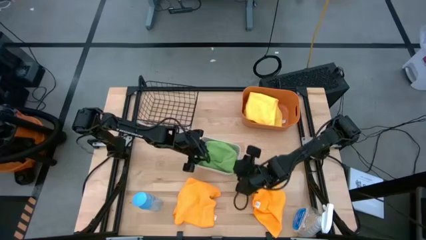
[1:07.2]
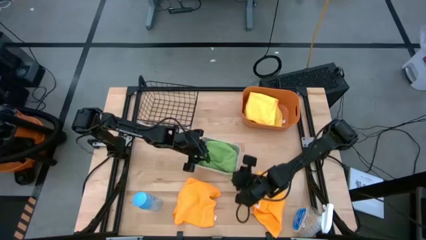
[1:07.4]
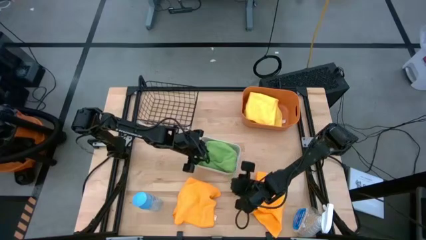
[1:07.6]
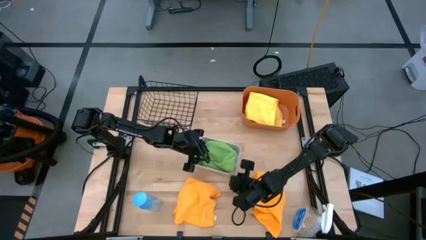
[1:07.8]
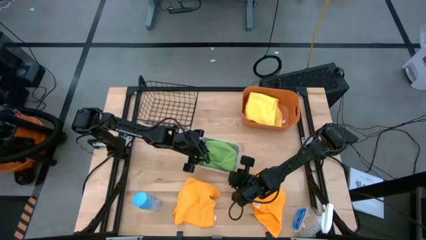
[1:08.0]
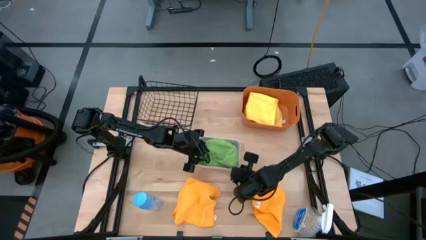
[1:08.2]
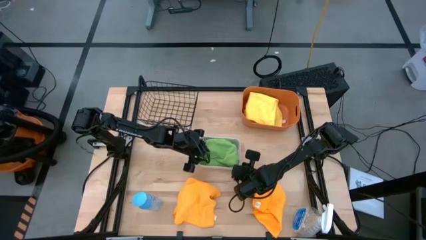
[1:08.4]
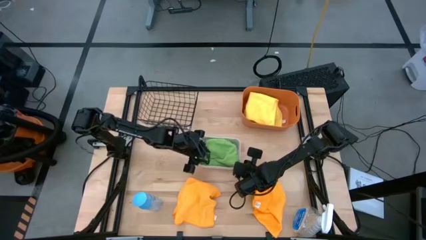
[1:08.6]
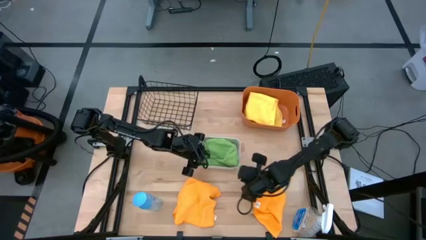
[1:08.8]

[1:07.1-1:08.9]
Task: Sort microfiber towel by color & place in baskets
Adjust the white bin

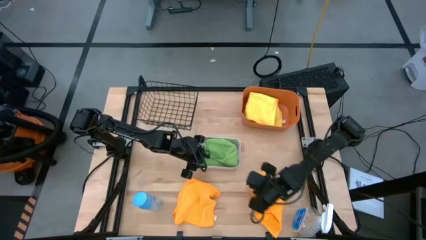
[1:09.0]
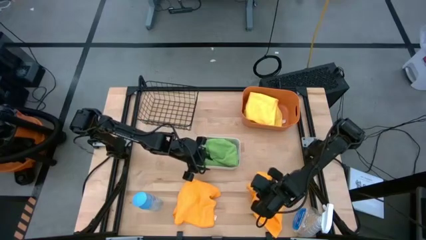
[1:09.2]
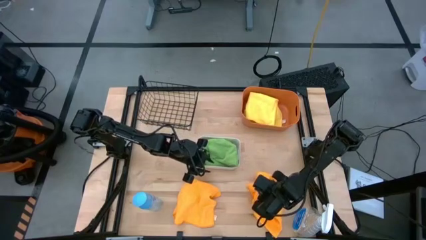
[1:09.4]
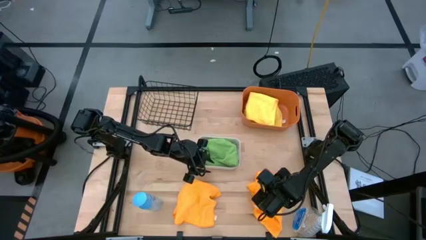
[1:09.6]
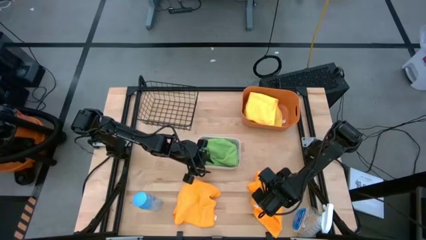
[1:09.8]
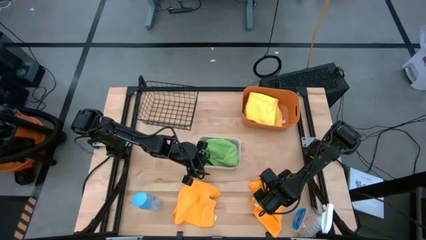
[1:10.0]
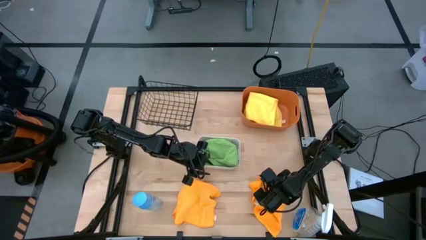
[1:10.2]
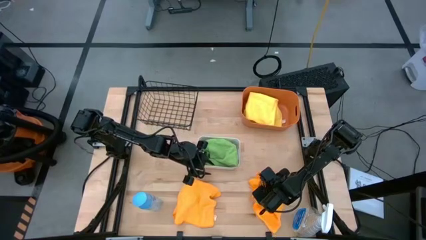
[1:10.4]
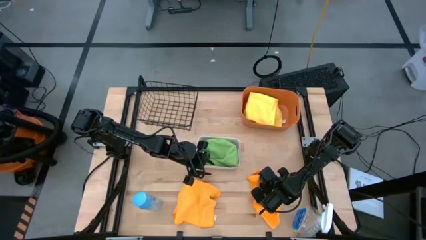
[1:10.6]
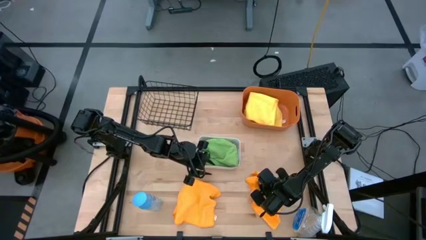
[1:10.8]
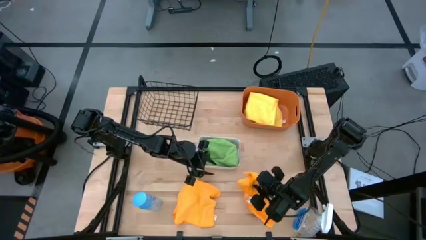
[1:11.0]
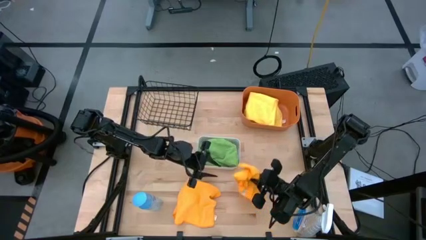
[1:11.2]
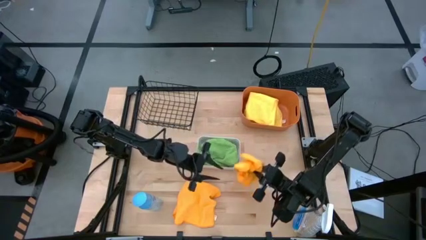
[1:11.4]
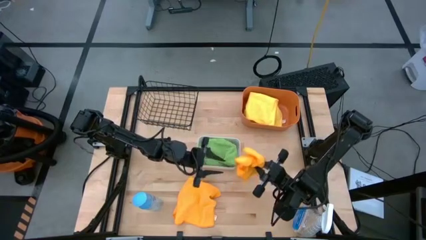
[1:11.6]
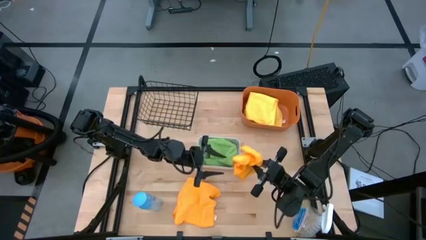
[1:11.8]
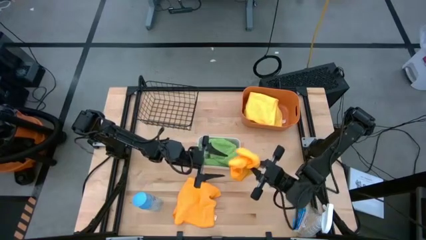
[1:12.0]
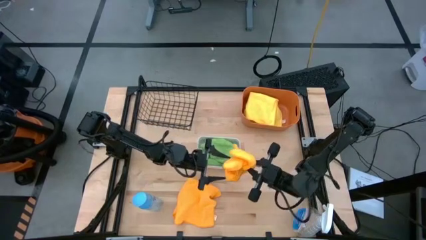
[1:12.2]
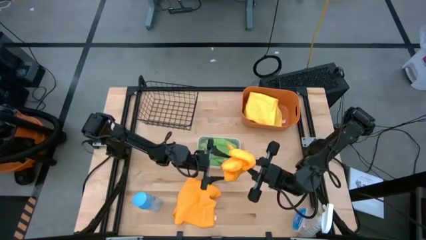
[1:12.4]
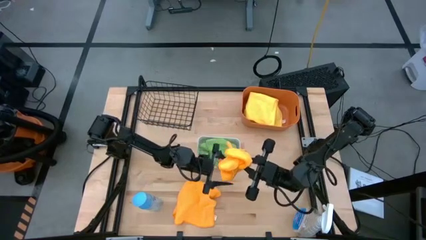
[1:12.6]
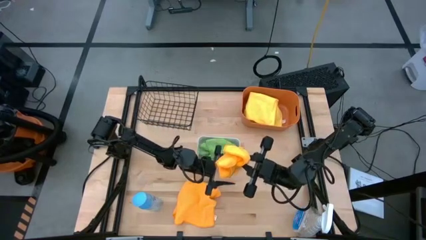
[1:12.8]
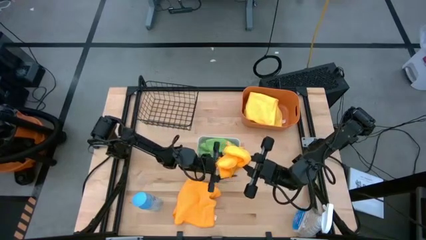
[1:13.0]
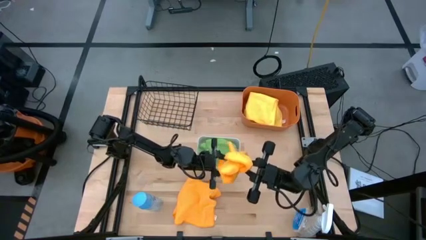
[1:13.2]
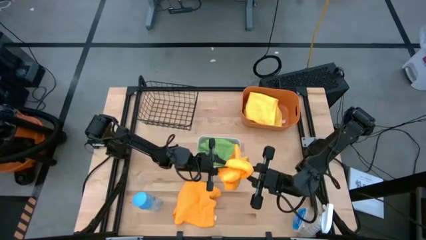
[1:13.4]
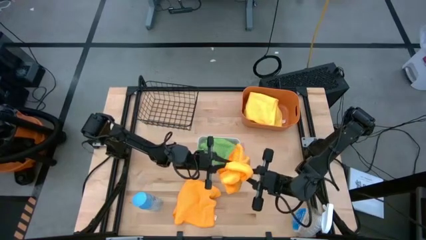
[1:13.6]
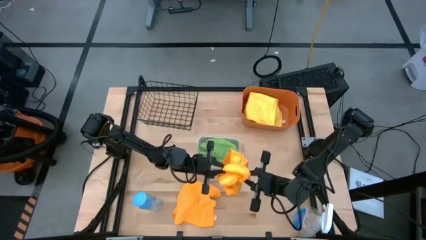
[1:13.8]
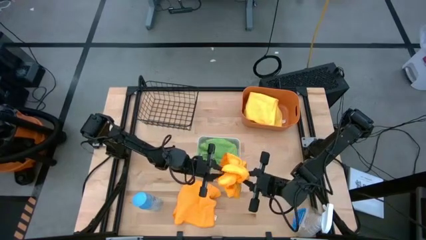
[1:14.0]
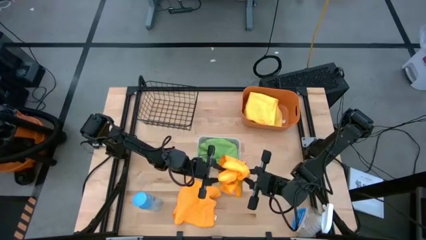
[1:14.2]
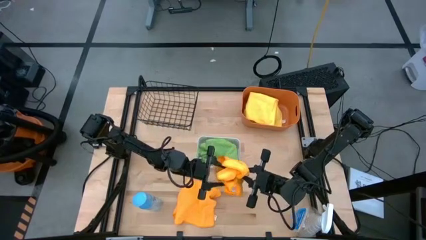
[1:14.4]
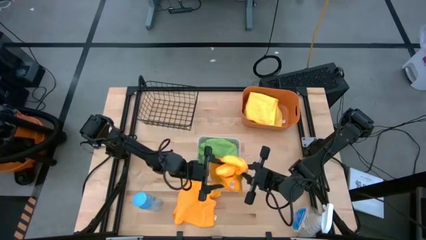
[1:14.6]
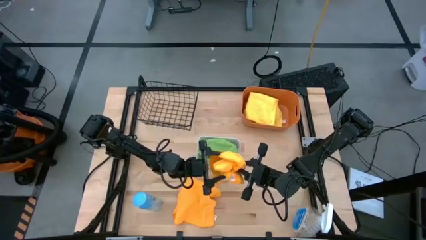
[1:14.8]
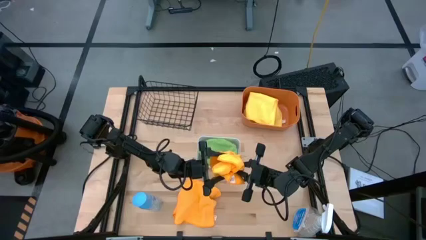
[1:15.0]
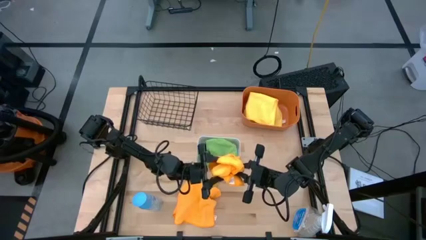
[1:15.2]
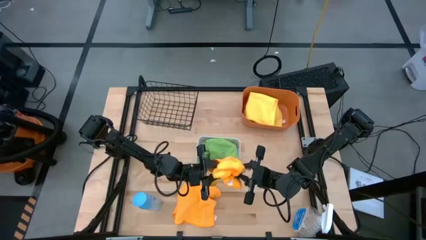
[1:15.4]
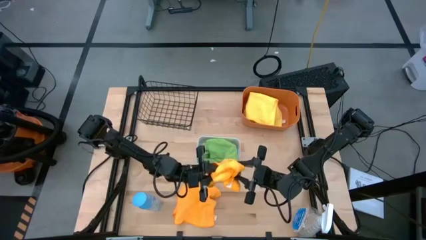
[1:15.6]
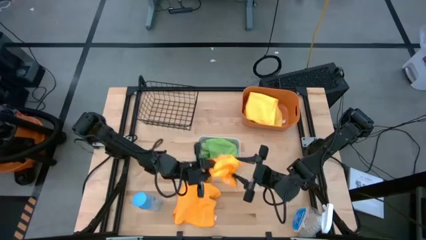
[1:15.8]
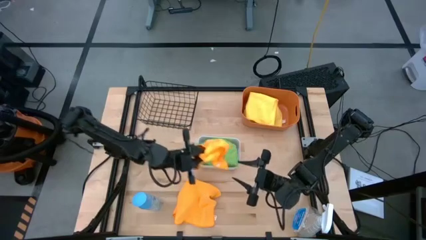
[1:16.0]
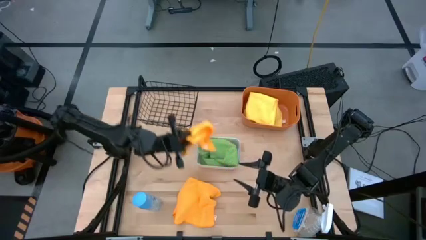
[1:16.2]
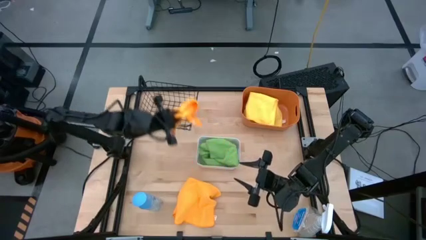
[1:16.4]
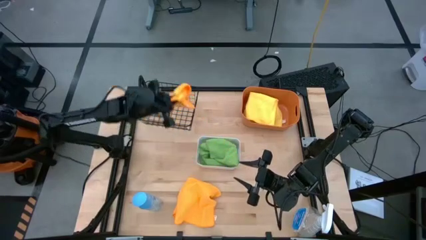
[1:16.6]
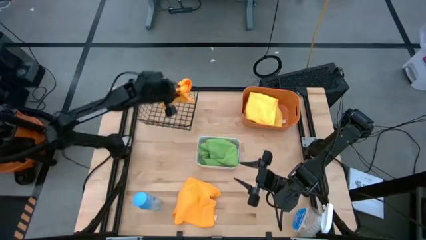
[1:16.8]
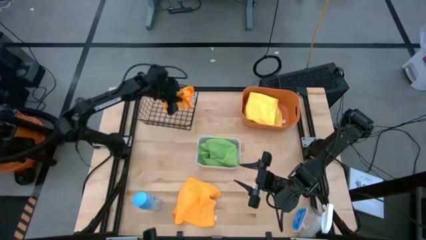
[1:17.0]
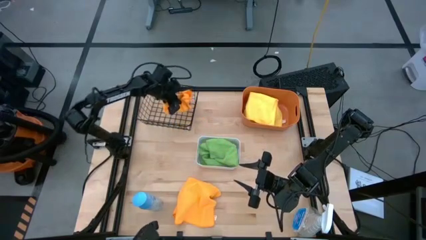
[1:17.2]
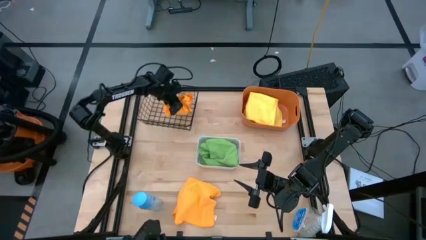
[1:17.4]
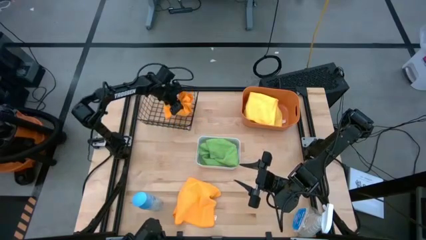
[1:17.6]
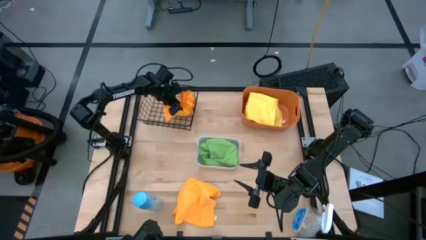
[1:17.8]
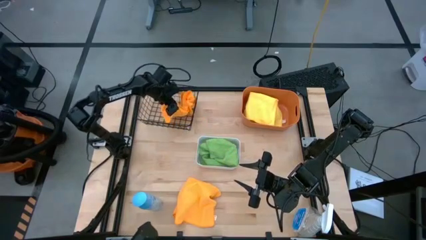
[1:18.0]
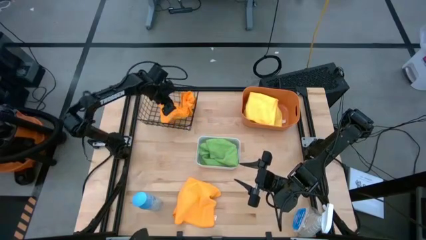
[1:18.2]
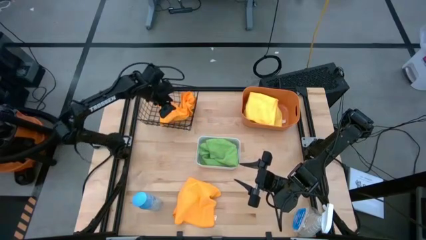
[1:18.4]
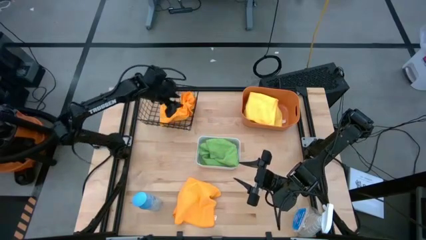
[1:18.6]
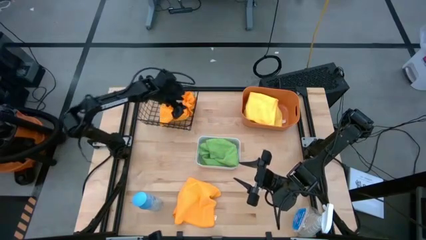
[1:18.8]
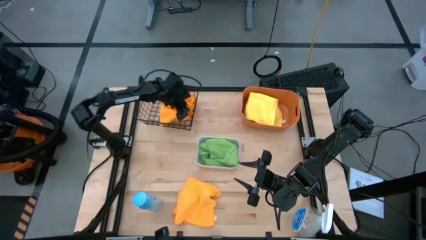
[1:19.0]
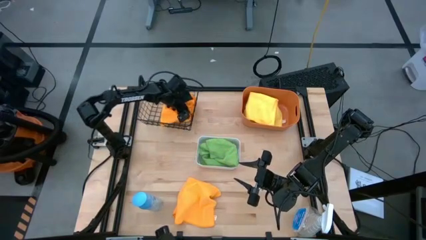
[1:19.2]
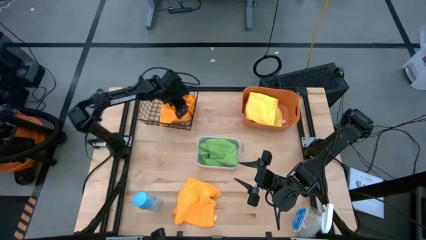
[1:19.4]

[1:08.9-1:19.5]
Put the left orange microfiber cloth into the black wired basket
